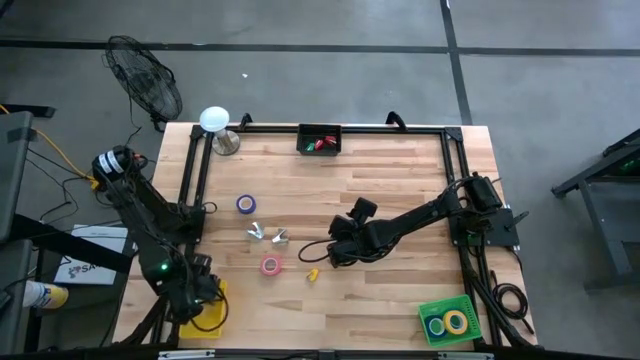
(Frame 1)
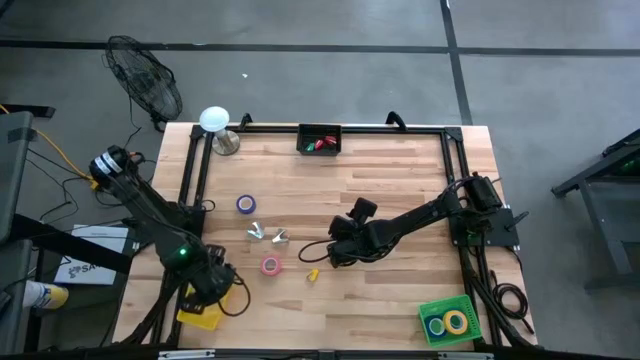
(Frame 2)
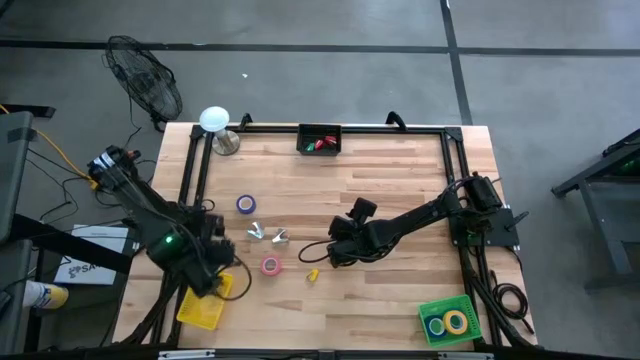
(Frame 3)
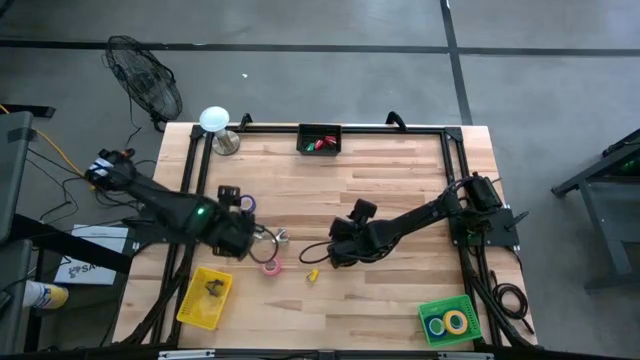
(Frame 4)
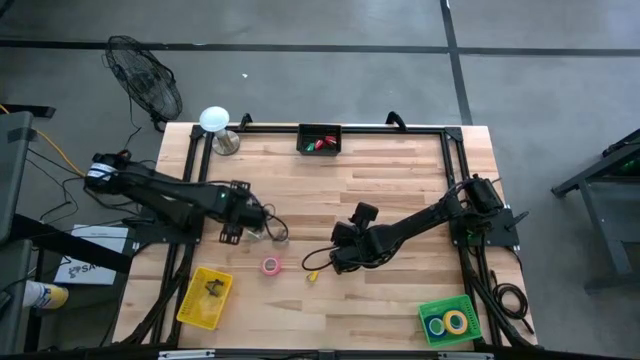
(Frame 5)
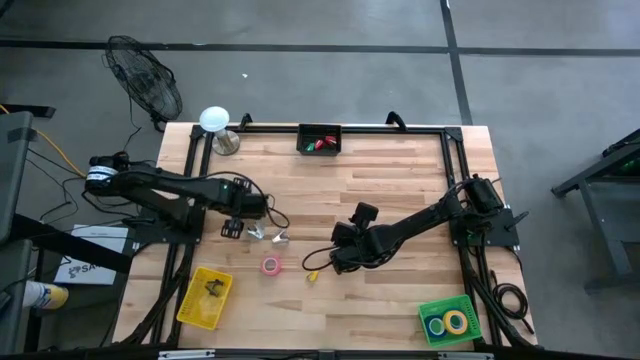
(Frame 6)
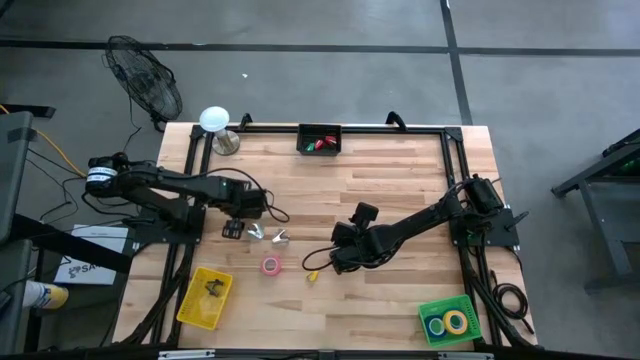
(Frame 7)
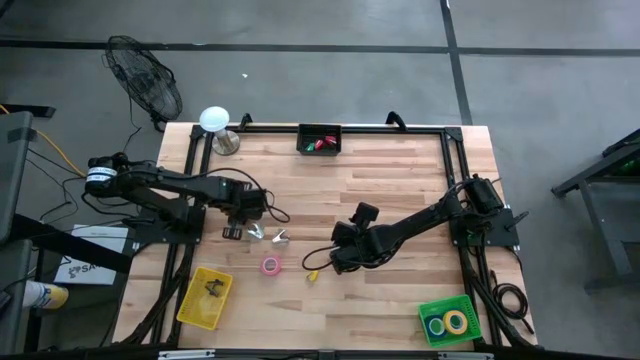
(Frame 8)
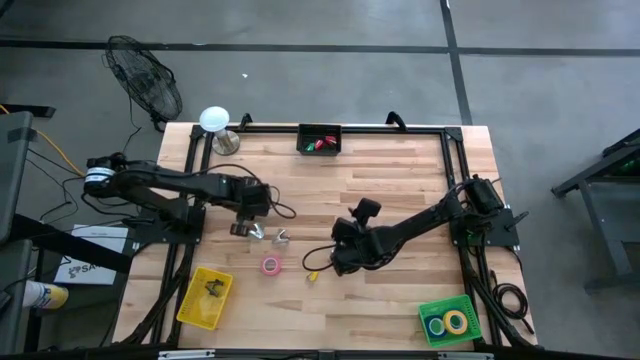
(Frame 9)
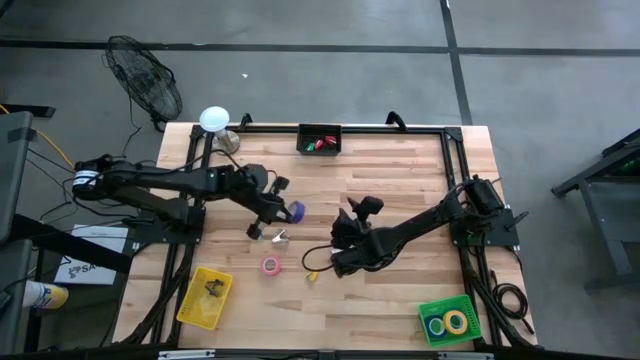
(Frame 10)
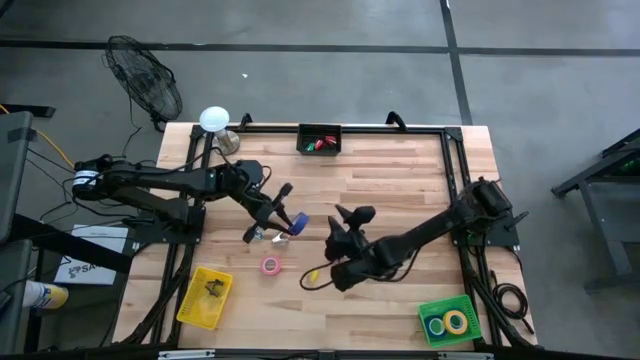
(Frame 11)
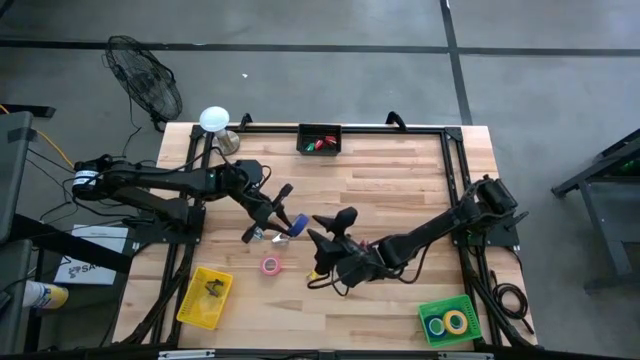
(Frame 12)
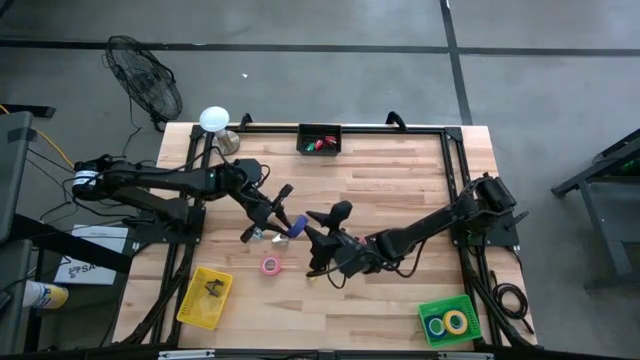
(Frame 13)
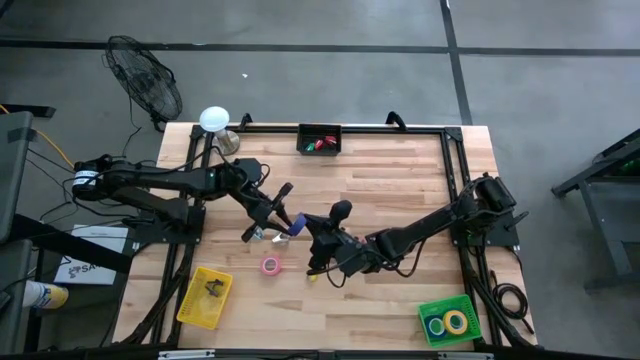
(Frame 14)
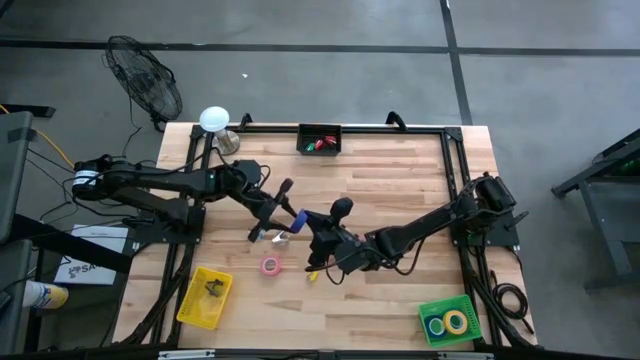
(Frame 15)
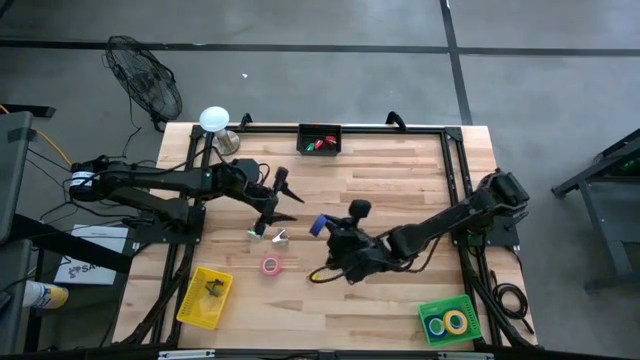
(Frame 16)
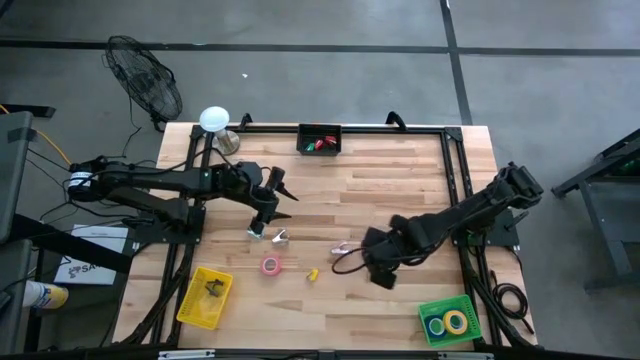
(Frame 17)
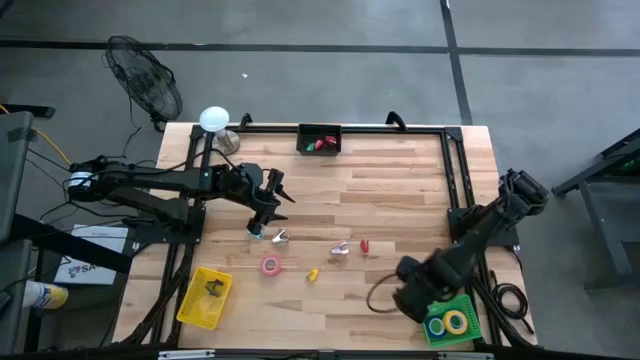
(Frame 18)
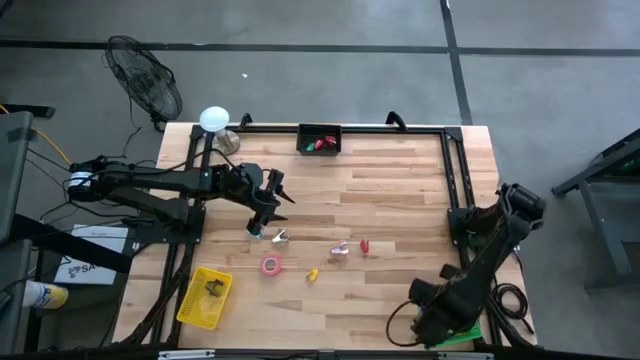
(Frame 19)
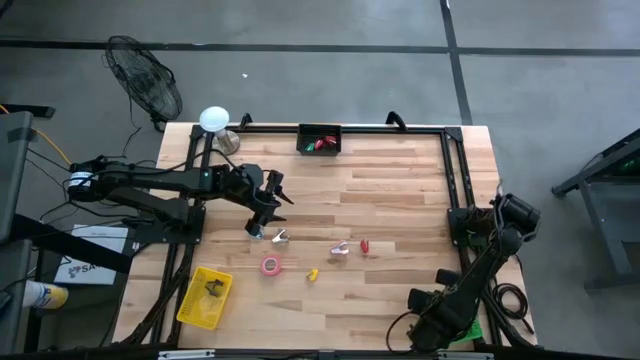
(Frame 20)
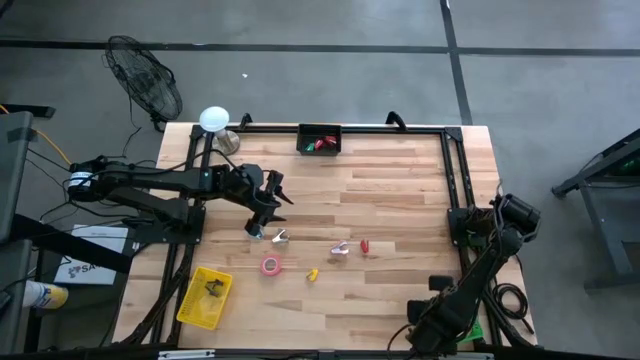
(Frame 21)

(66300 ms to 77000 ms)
Task: Pick and place Stapler, Stapler remover, tape
Put the blue tape into the green bin

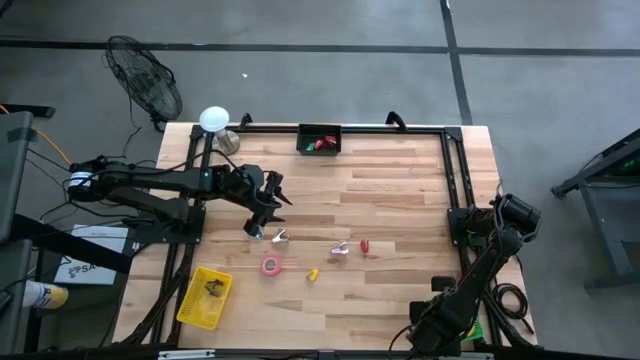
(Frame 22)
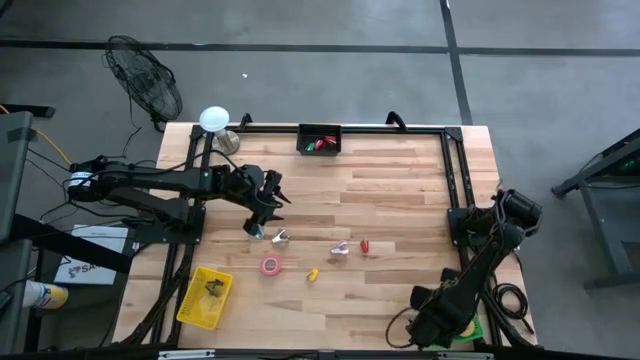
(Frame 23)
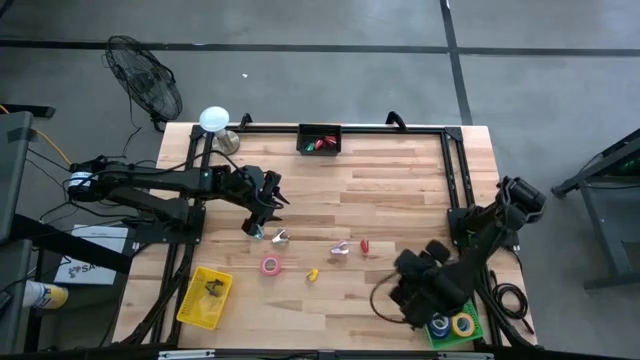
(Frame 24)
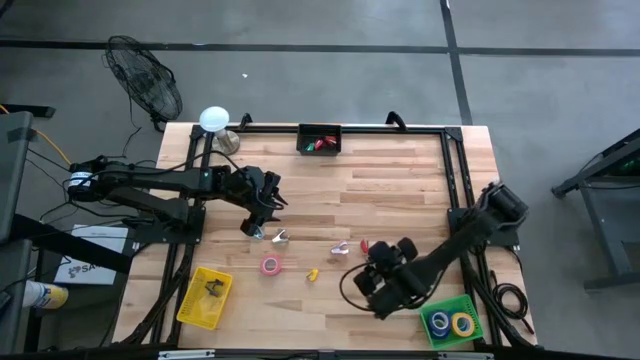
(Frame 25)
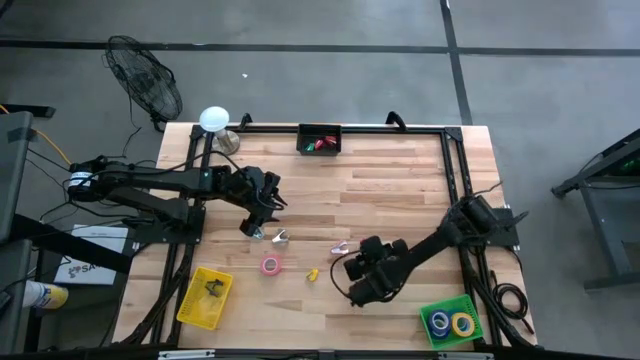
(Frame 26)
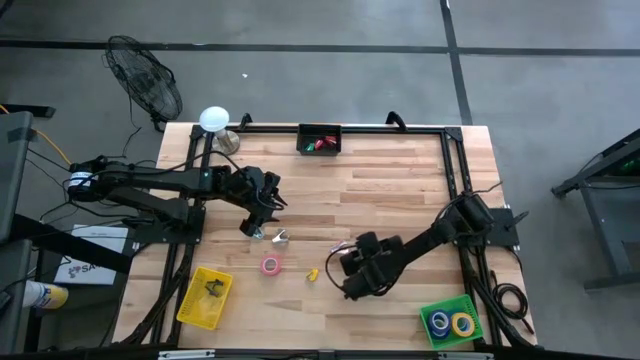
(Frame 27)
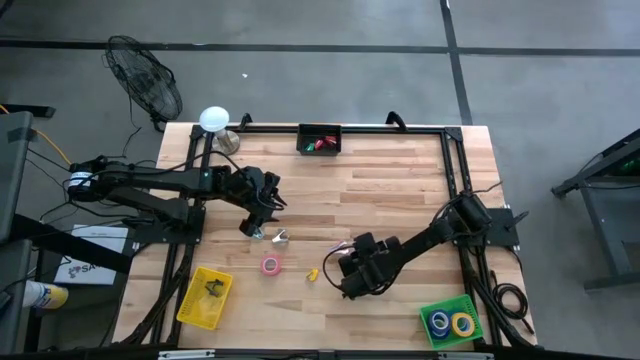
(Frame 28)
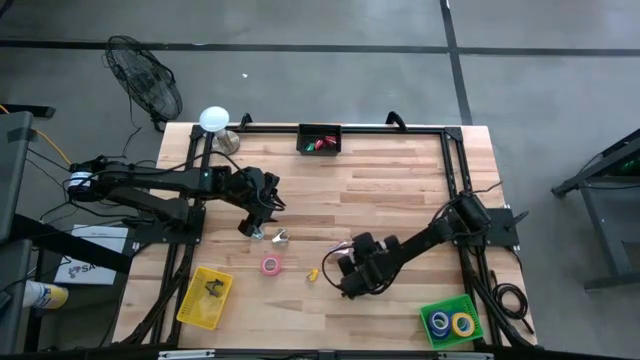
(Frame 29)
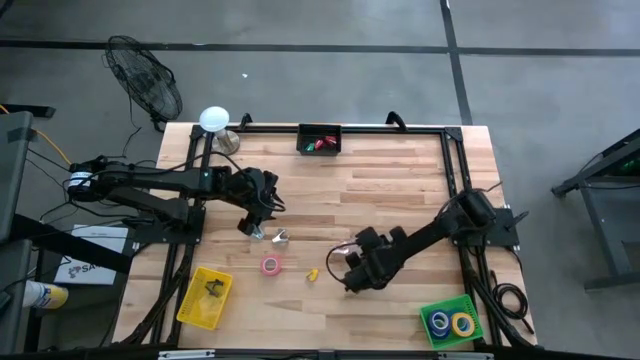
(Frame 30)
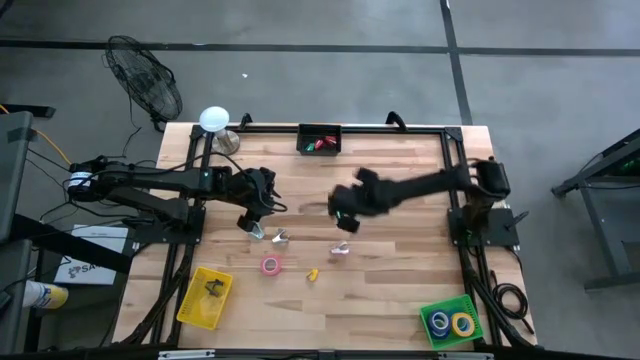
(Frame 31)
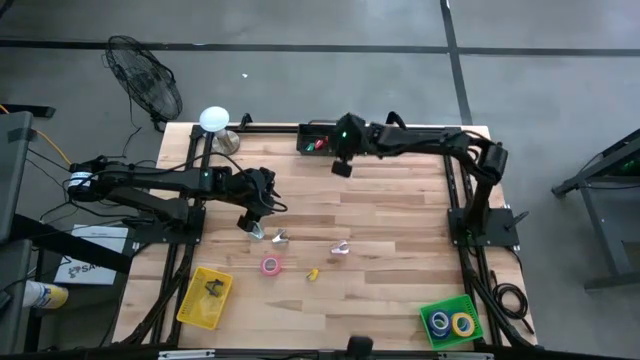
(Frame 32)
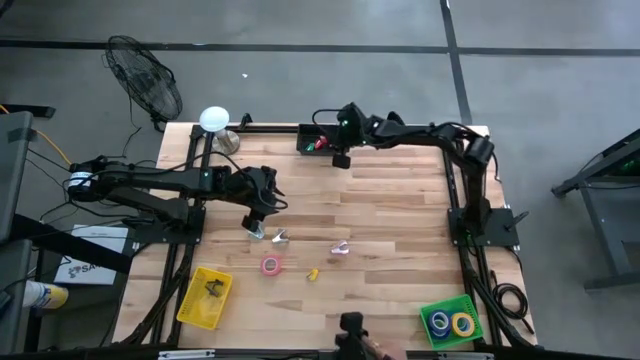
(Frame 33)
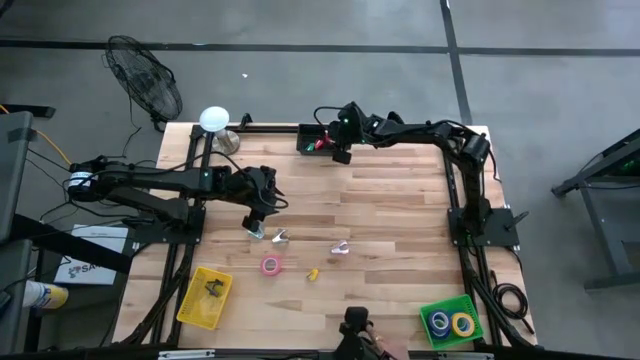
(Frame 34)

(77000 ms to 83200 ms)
Put the red stapler into the black bin

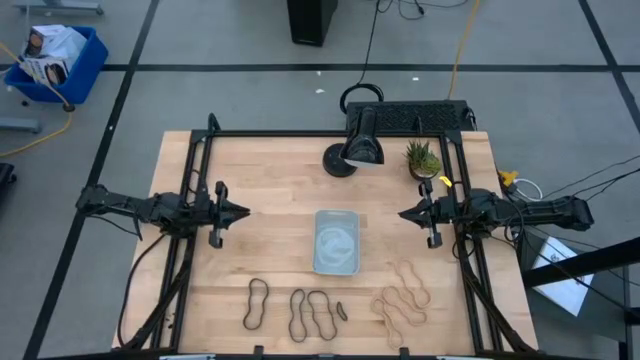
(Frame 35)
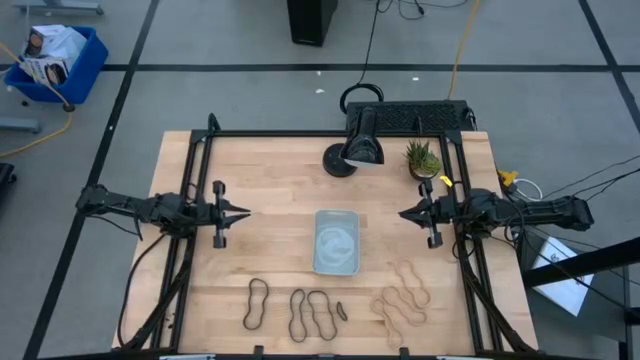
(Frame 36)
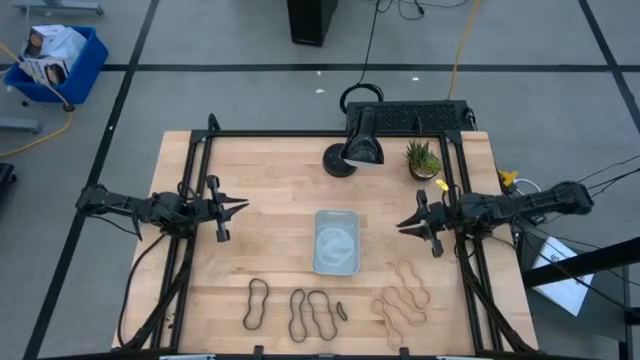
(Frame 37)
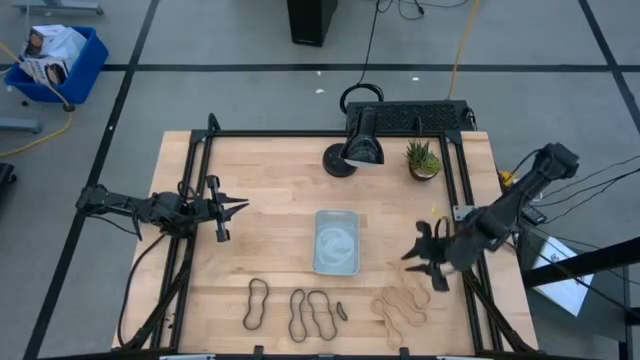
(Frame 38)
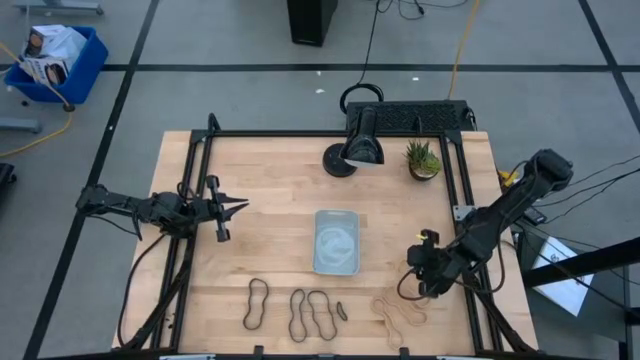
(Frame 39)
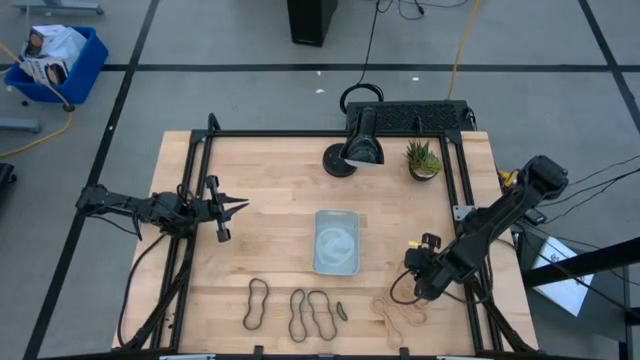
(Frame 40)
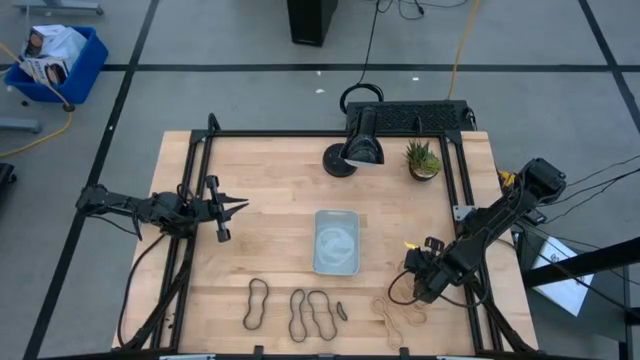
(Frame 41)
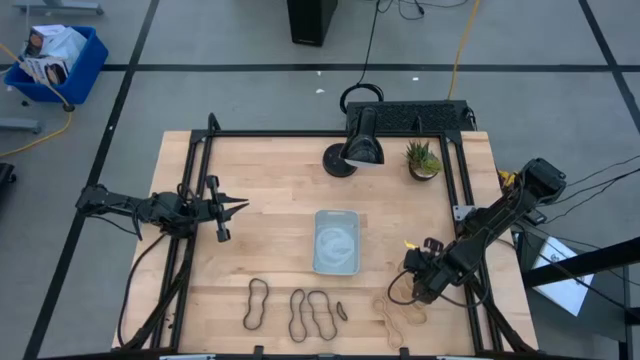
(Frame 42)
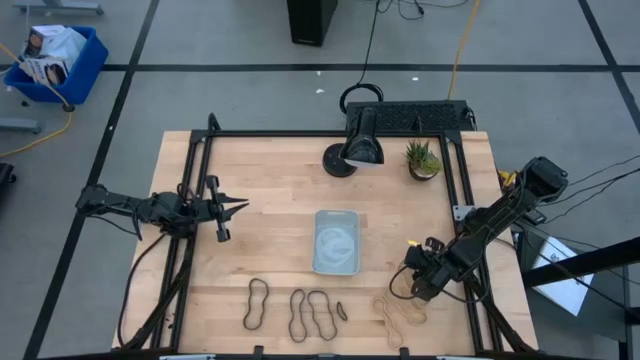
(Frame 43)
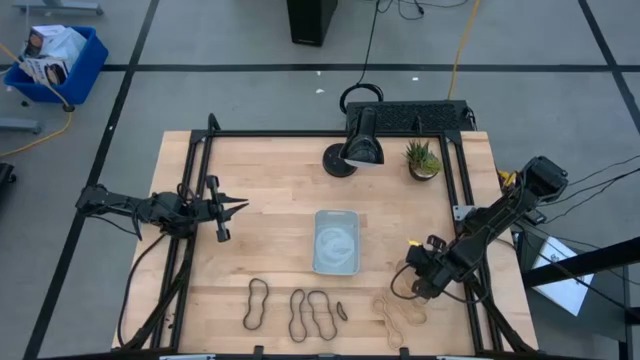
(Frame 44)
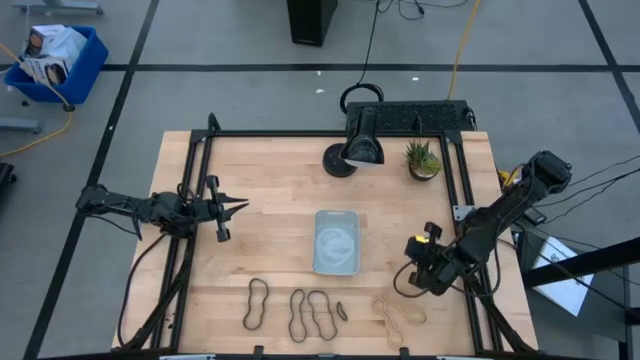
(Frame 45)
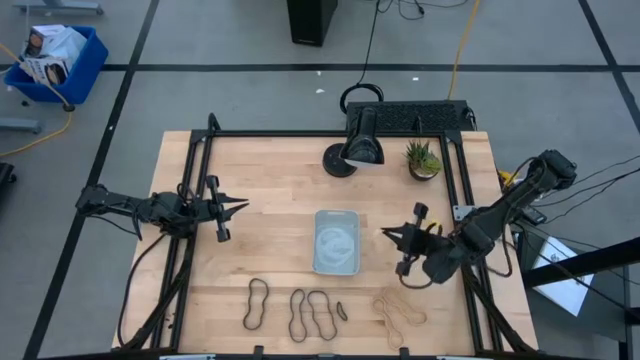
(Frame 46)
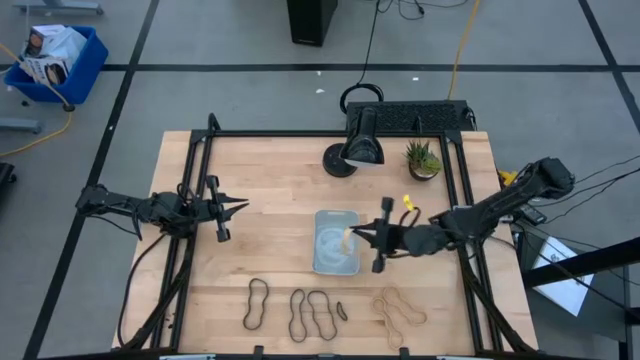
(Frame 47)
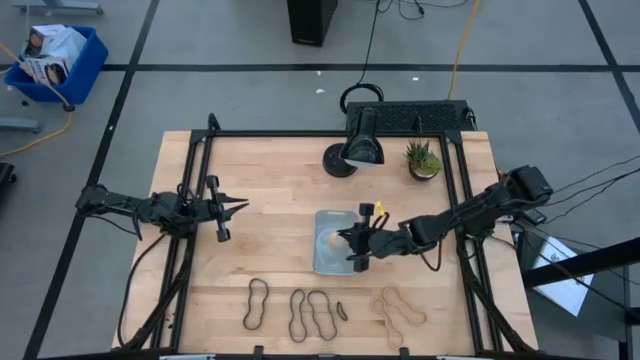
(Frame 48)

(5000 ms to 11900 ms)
Task: Pick and place rubber bands into bin
Put the brown rubber band into the gray container
